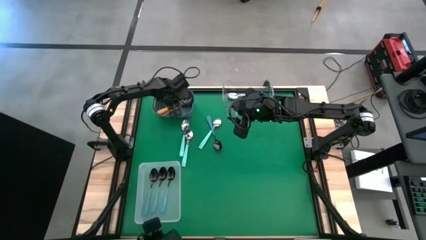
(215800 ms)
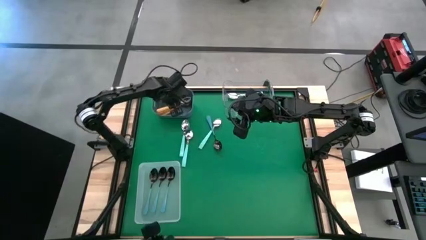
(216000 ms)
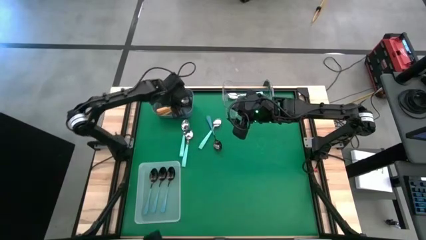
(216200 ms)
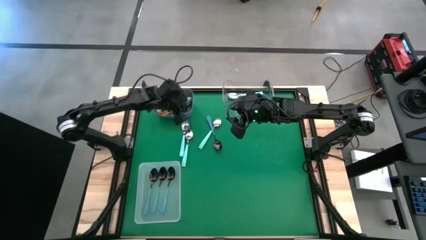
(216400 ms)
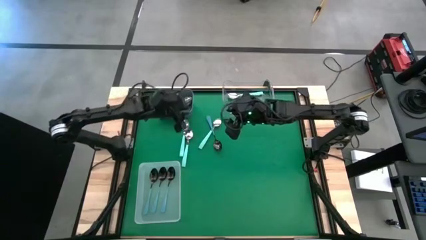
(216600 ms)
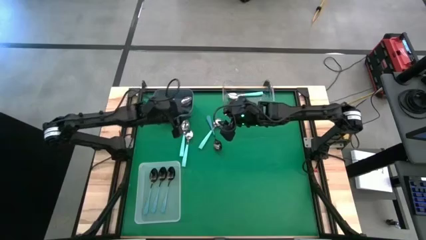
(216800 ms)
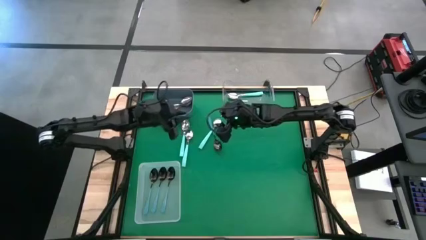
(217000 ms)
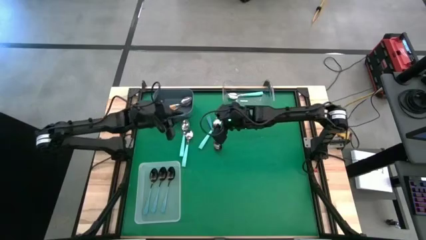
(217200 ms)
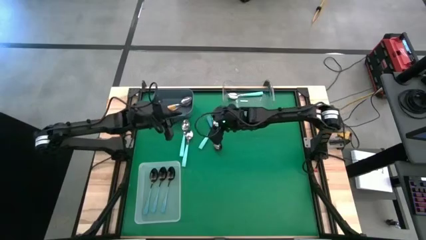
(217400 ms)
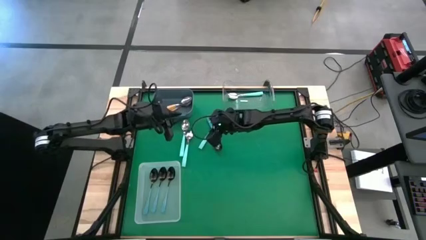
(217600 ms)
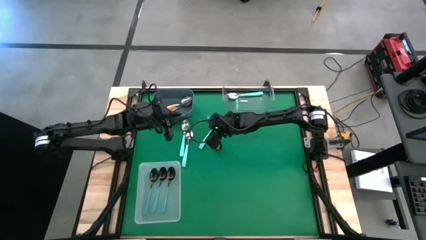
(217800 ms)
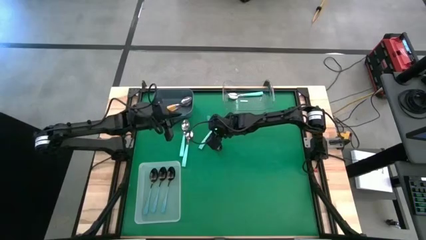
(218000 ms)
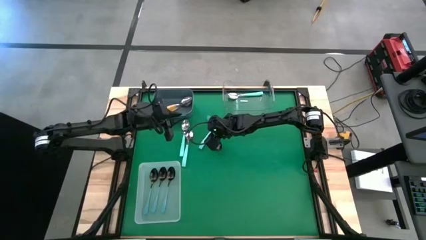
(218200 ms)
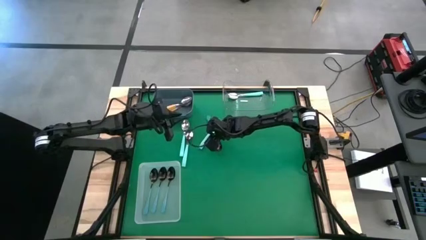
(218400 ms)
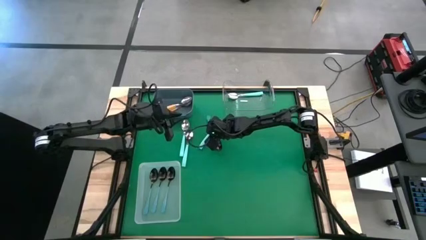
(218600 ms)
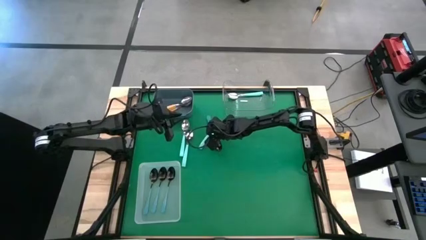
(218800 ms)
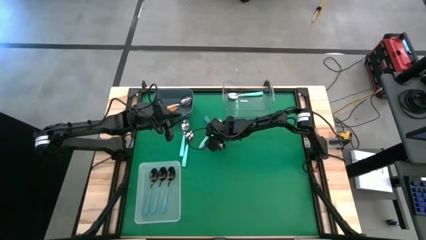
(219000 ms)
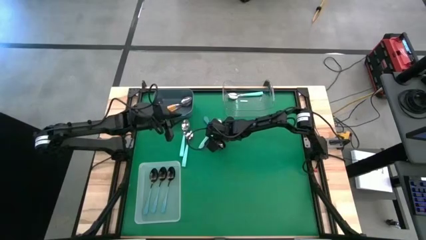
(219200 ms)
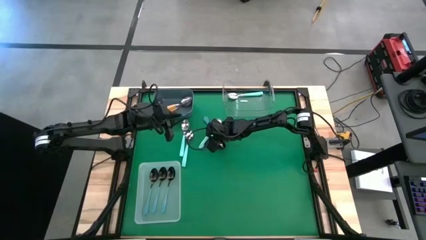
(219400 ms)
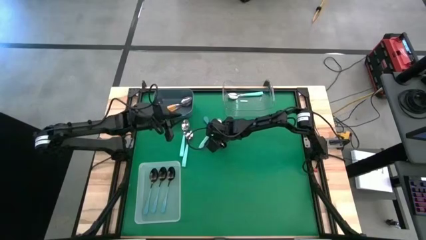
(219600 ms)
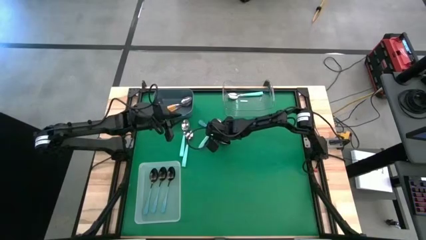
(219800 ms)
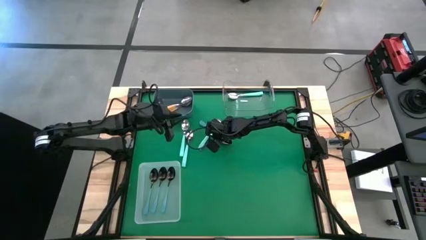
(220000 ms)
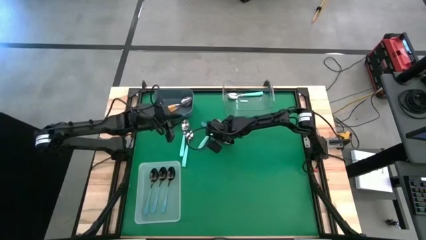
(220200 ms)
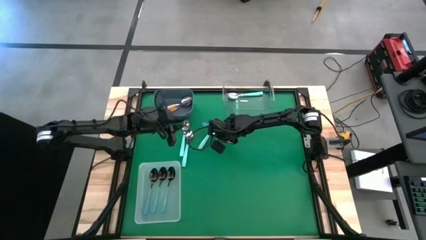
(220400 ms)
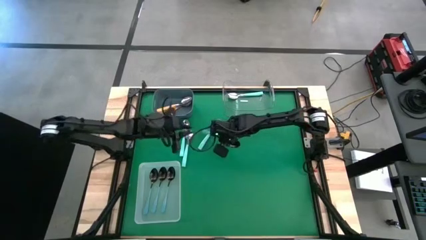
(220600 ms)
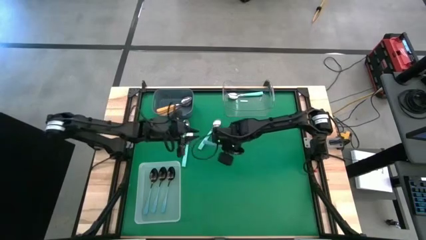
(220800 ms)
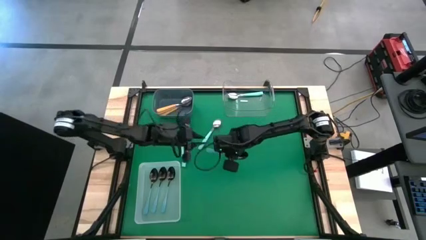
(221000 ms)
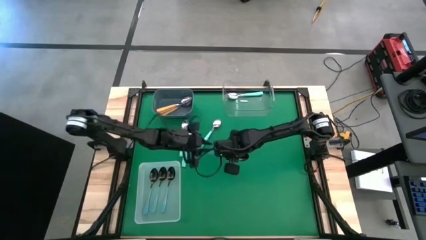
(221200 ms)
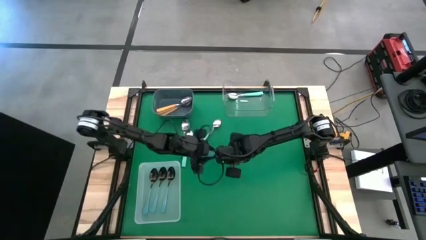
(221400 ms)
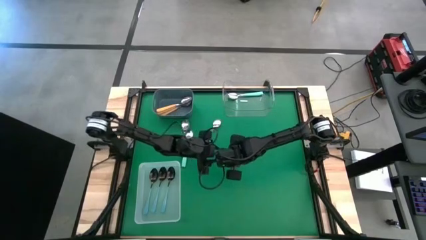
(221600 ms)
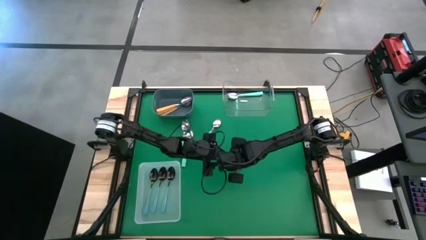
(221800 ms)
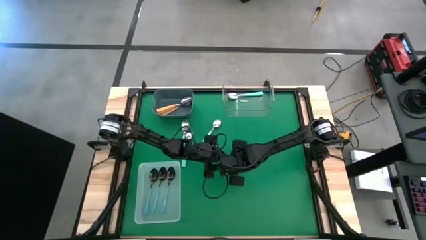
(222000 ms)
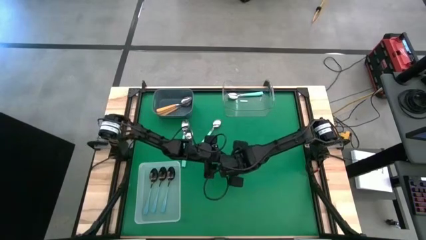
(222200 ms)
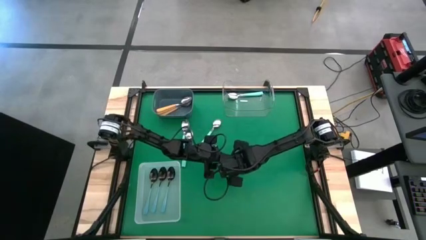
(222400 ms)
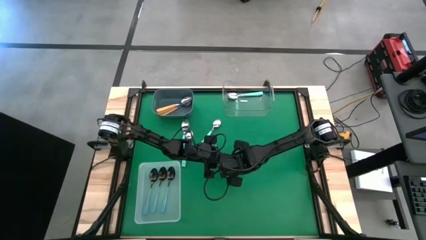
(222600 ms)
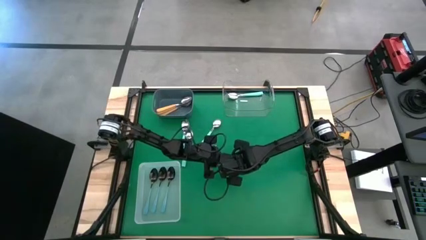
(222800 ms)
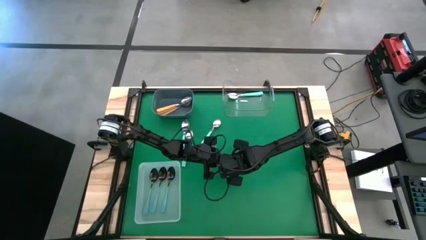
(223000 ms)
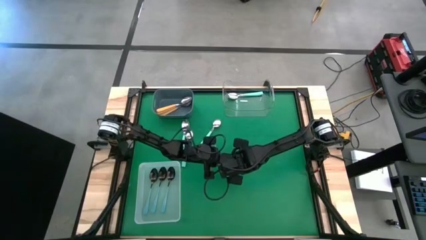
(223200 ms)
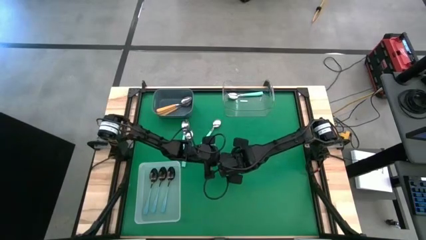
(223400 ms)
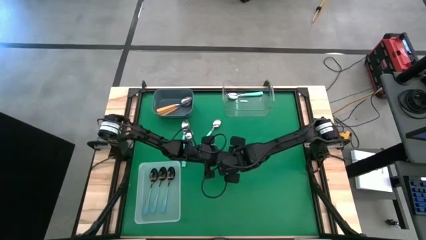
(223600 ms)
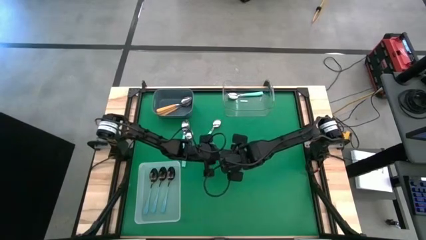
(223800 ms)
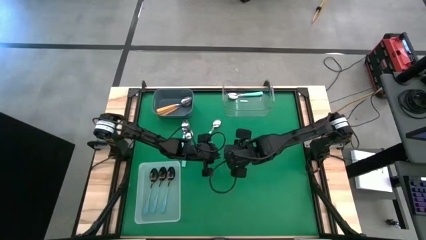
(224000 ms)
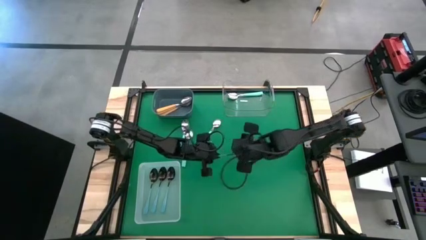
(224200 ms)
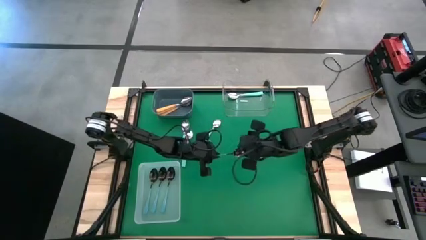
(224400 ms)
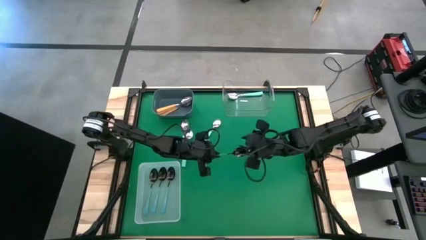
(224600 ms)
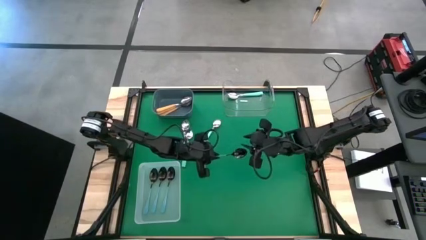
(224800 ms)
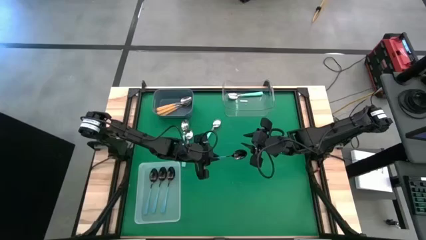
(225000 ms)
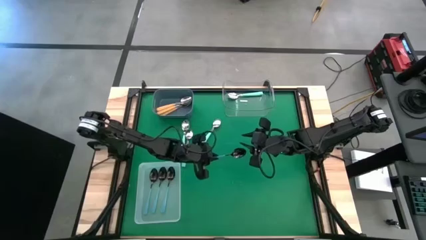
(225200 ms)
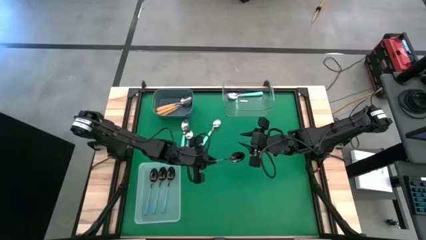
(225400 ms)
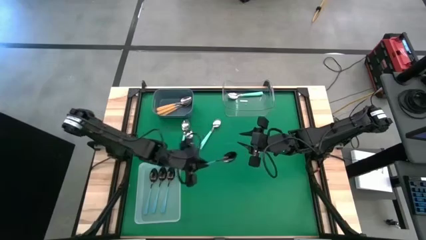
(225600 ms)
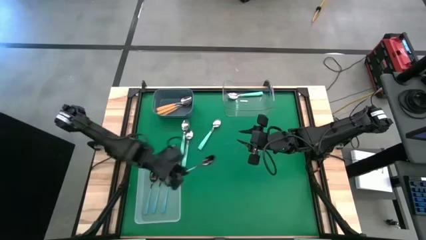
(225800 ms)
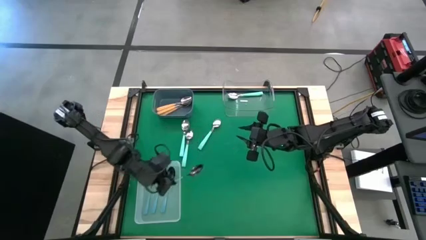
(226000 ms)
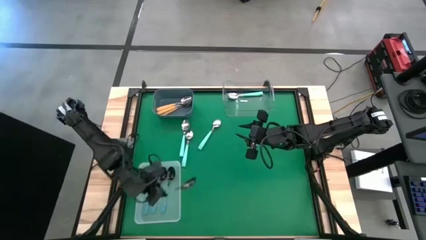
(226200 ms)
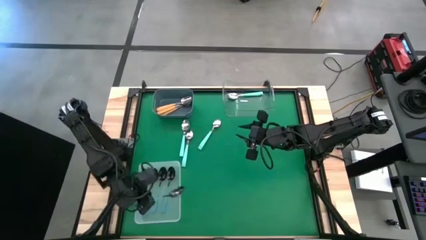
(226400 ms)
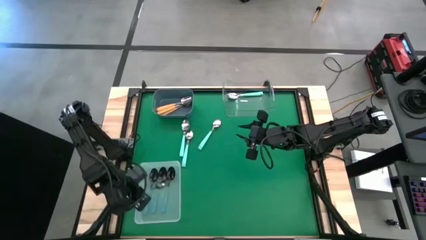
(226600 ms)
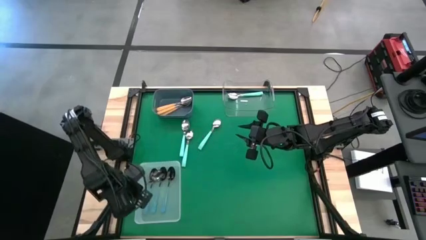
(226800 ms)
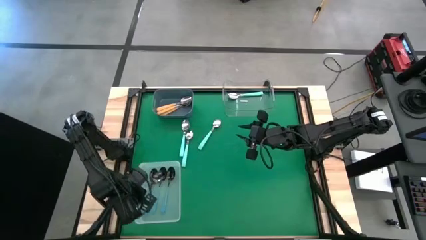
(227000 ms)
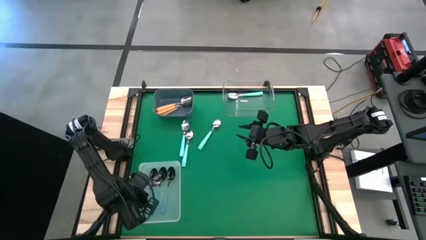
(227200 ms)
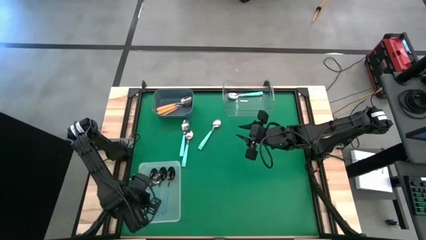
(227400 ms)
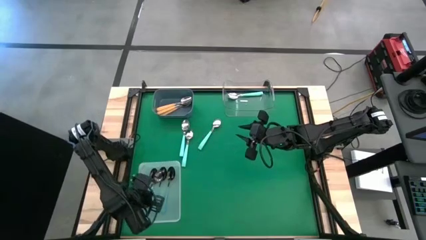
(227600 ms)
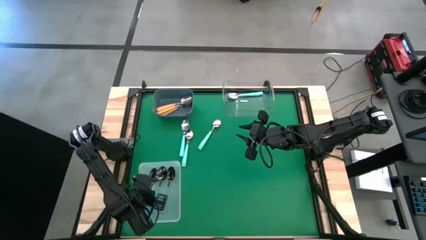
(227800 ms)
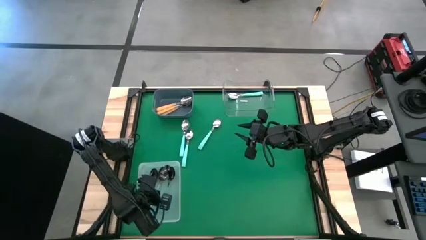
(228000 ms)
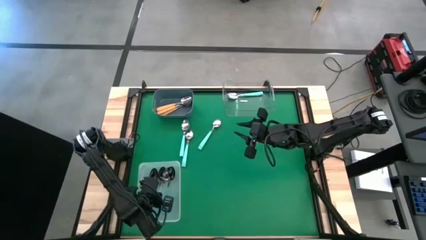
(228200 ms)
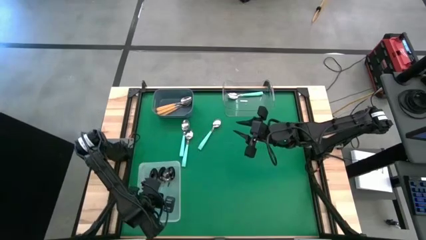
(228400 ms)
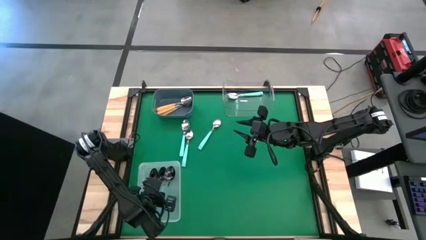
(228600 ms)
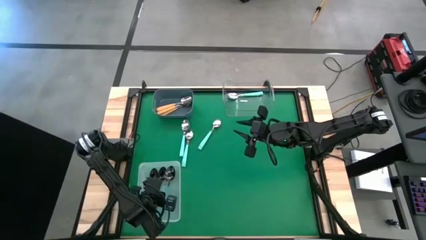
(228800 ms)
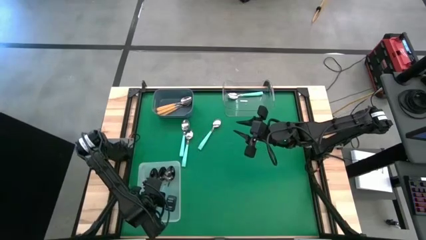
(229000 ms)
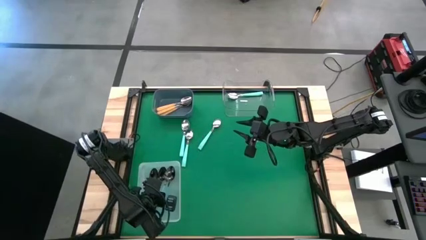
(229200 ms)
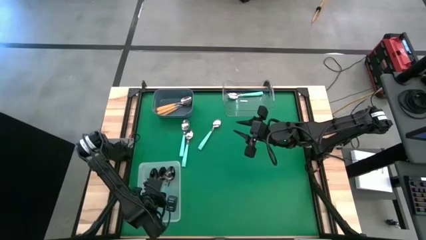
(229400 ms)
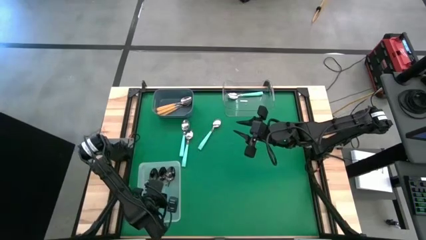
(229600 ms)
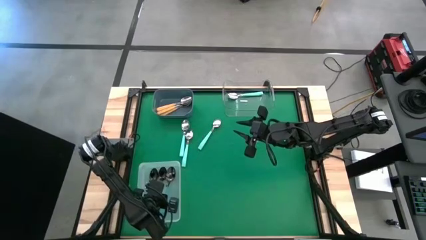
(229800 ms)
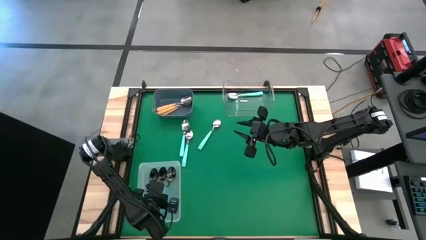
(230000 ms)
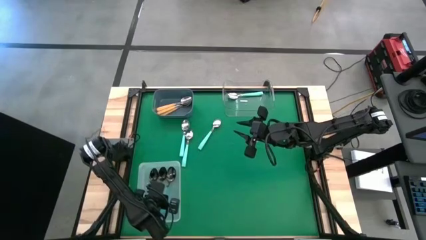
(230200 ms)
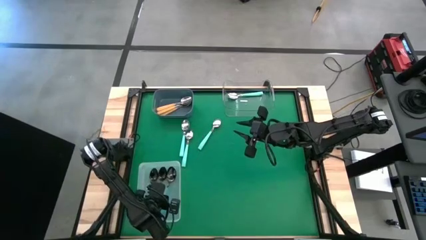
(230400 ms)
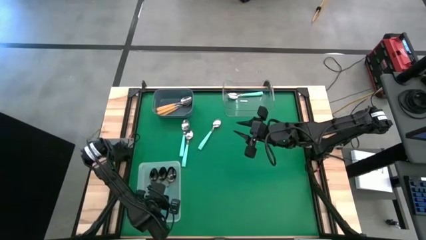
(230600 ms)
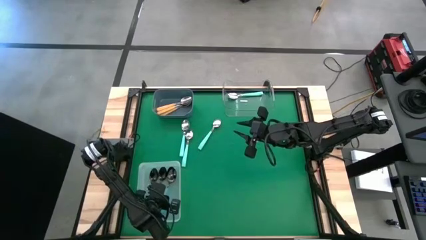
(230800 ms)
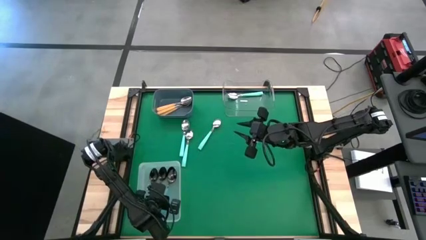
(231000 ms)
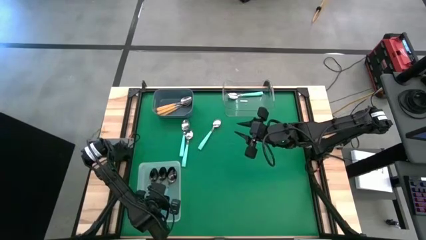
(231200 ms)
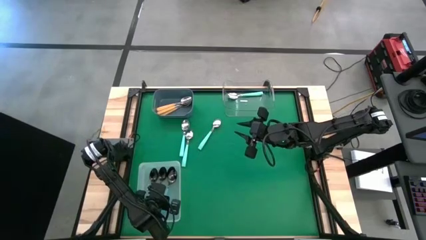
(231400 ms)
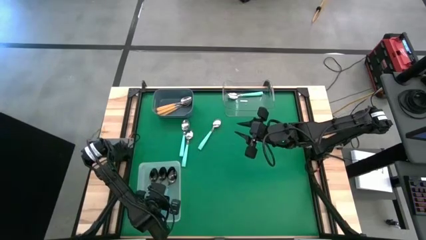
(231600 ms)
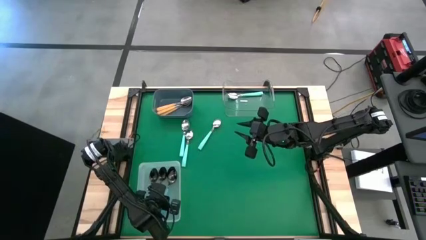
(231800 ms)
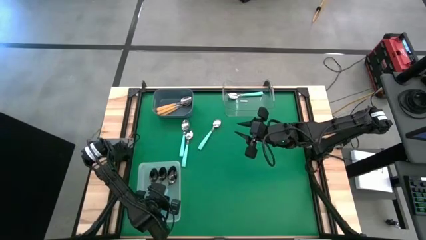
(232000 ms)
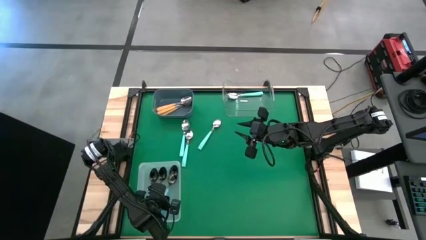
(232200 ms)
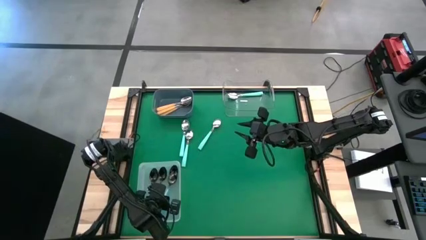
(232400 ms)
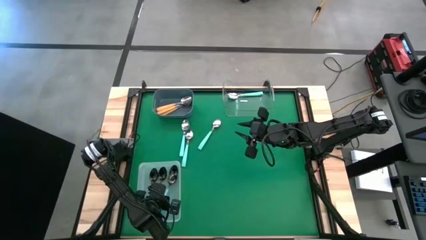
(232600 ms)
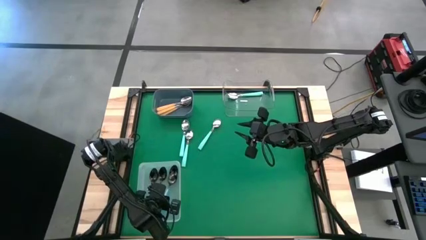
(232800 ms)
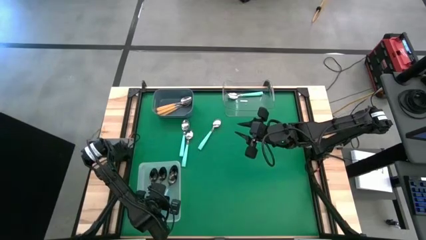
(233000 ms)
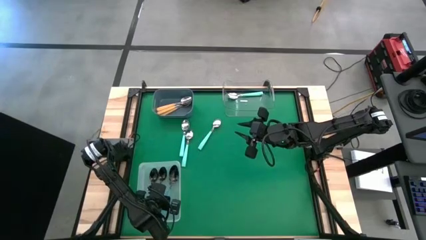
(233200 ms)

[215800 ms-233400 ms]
Task: Sort silverware by color (type)
Put the dark blue spoon into the white bin
